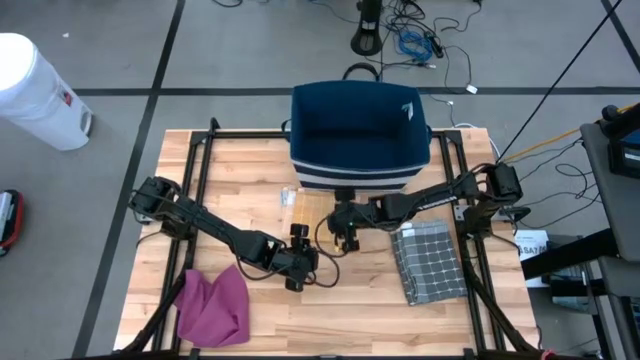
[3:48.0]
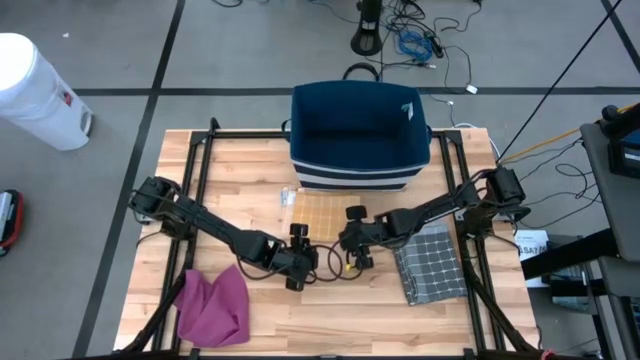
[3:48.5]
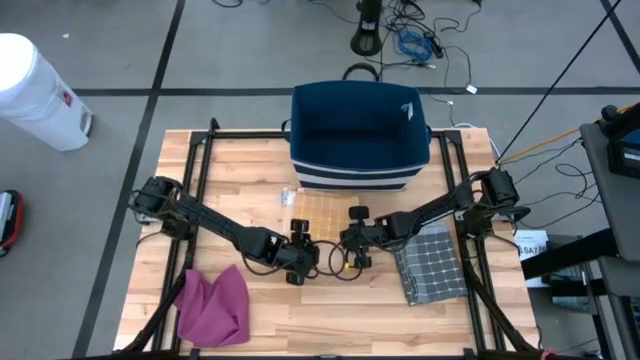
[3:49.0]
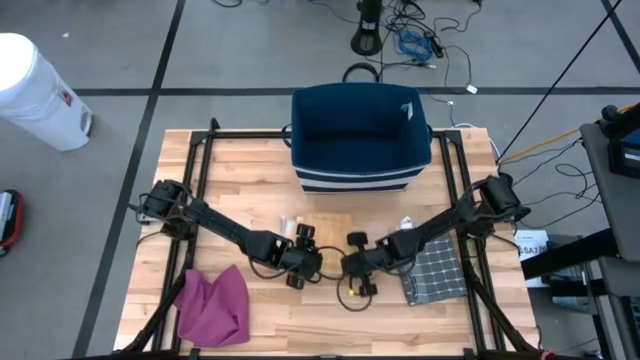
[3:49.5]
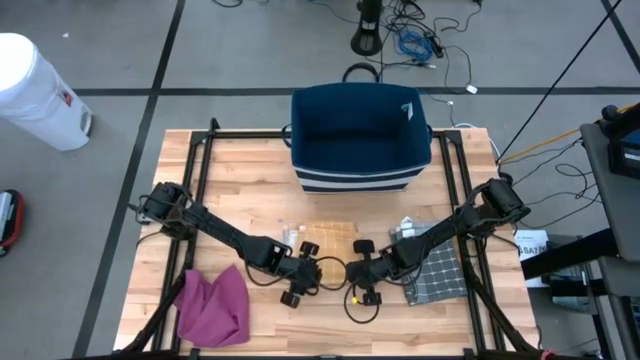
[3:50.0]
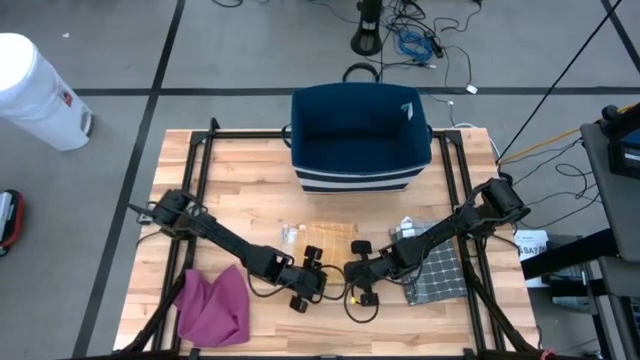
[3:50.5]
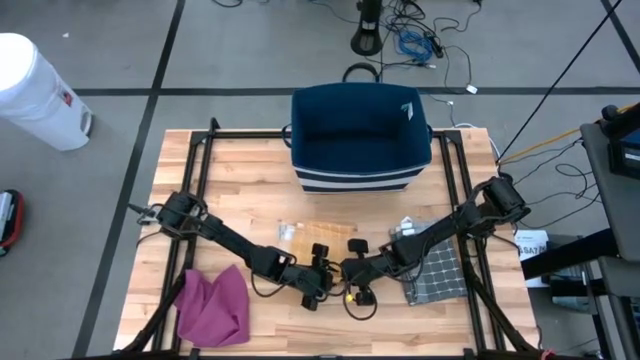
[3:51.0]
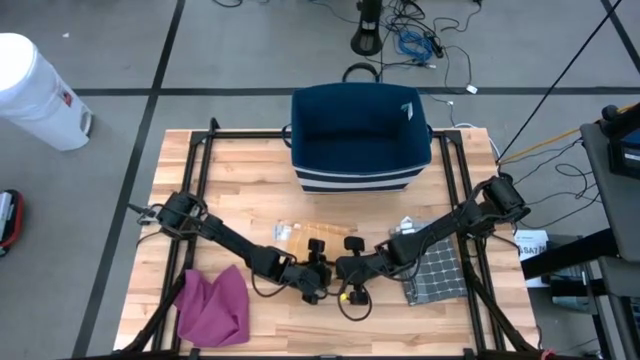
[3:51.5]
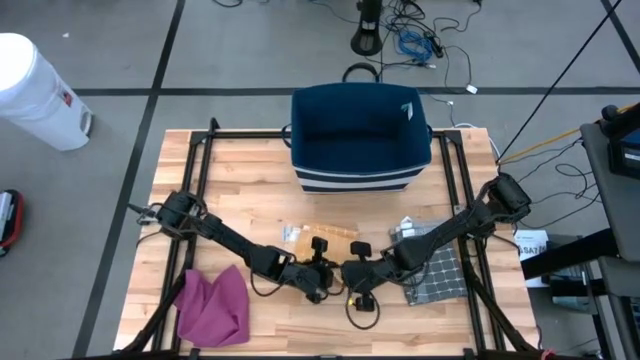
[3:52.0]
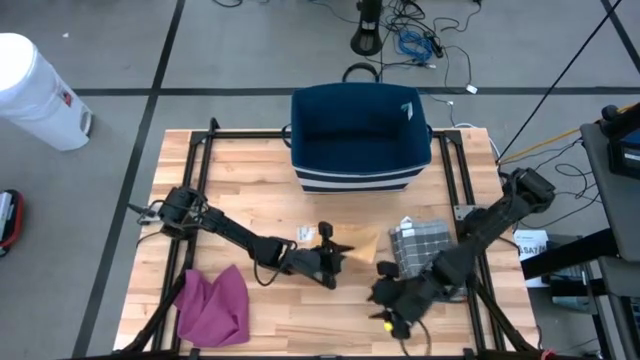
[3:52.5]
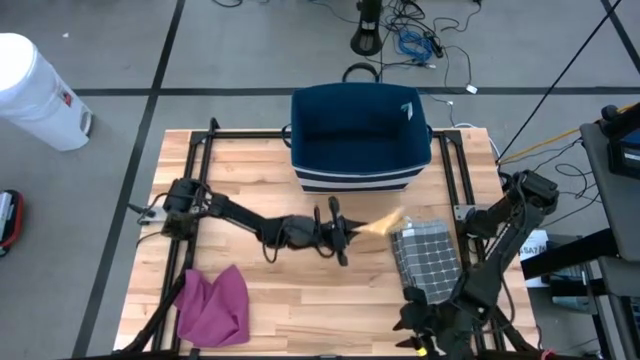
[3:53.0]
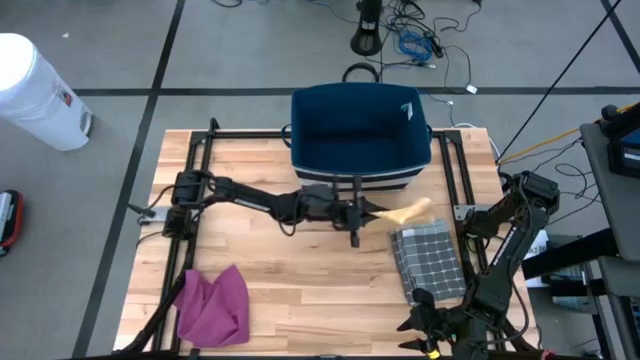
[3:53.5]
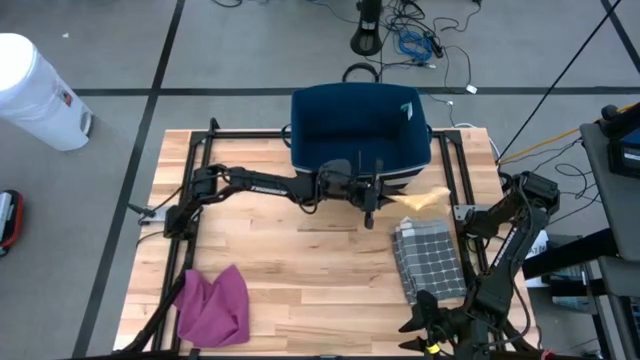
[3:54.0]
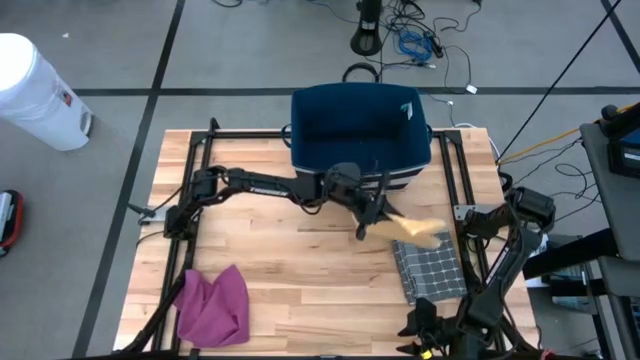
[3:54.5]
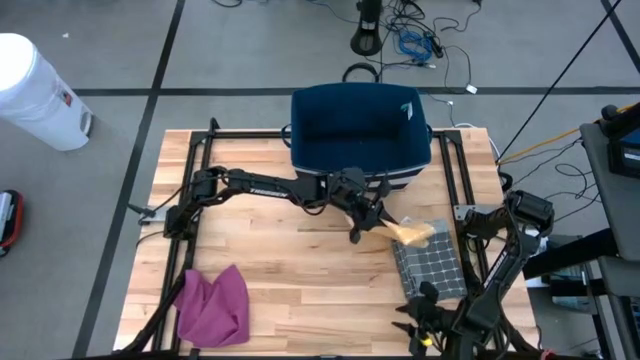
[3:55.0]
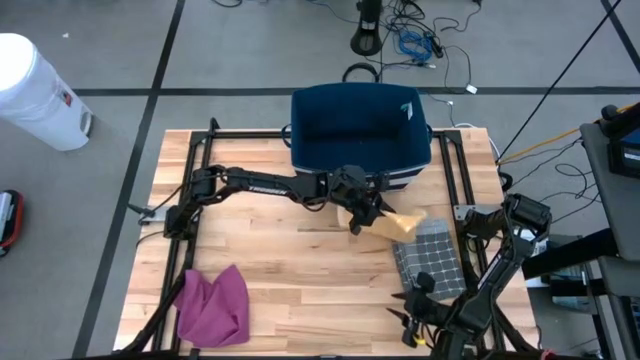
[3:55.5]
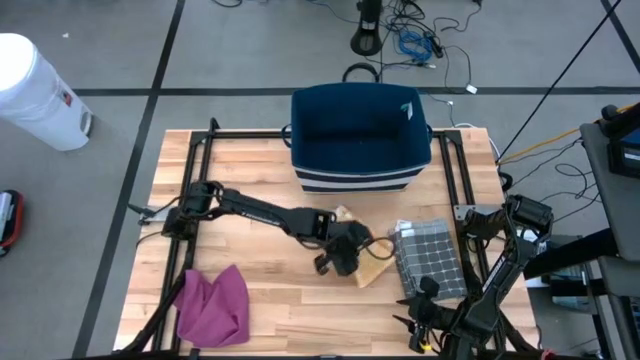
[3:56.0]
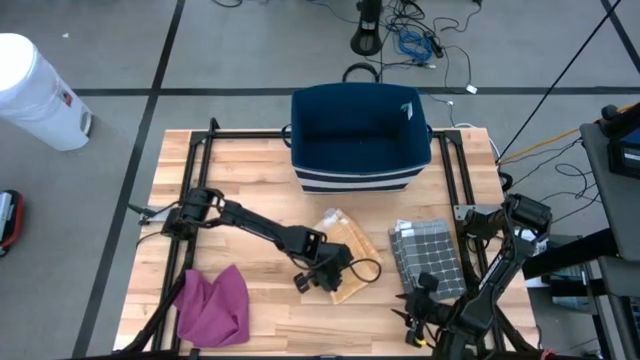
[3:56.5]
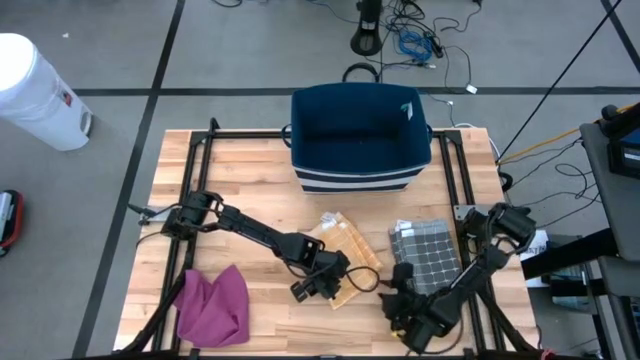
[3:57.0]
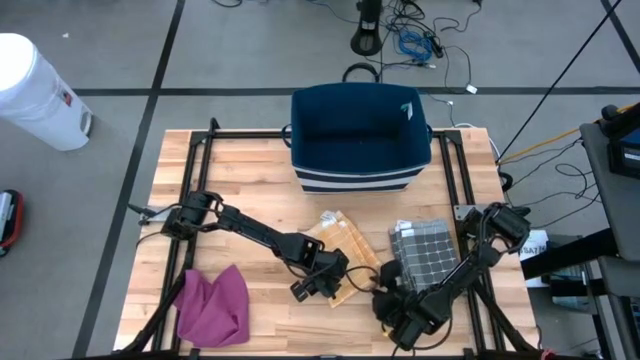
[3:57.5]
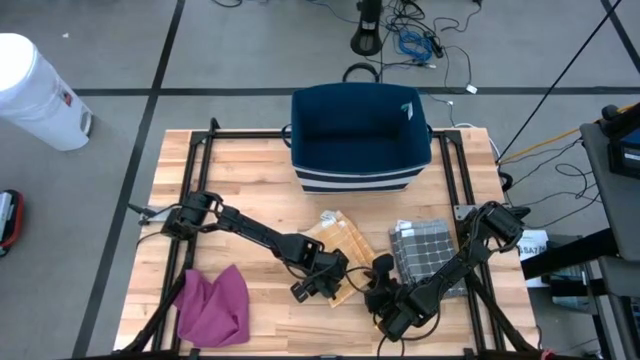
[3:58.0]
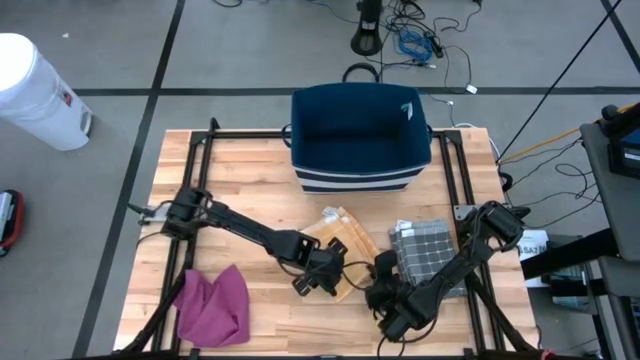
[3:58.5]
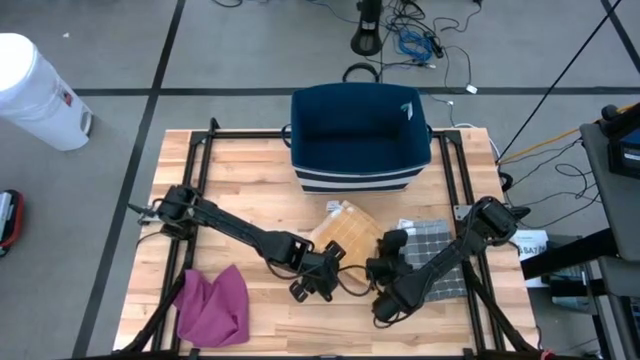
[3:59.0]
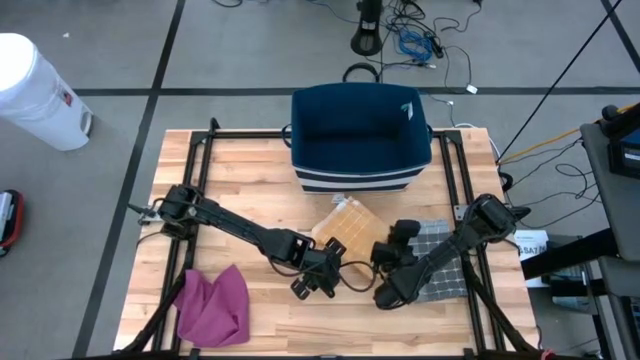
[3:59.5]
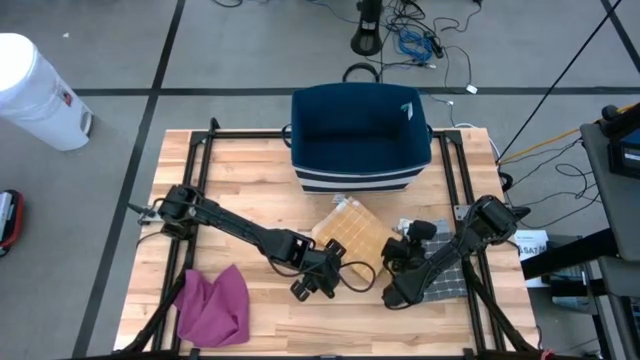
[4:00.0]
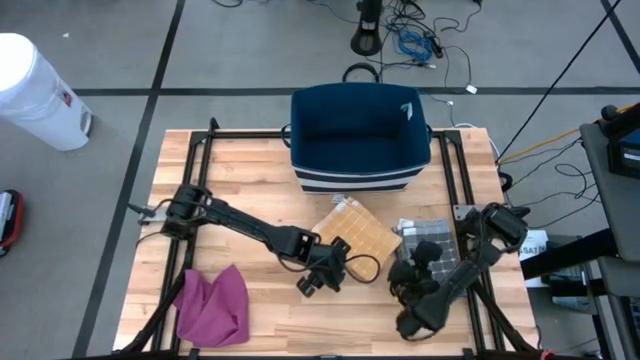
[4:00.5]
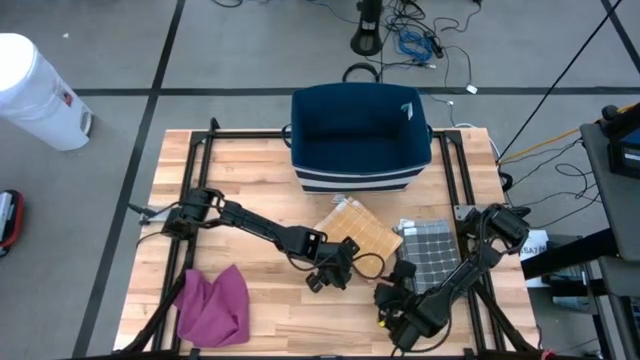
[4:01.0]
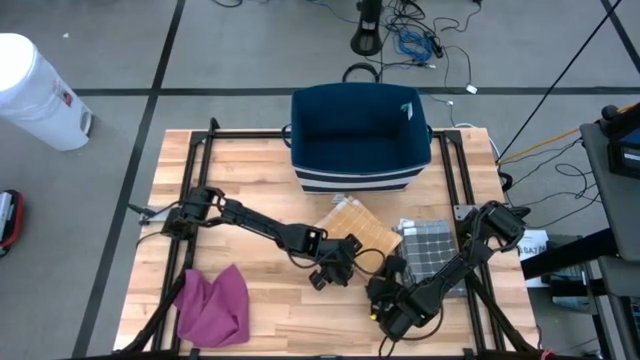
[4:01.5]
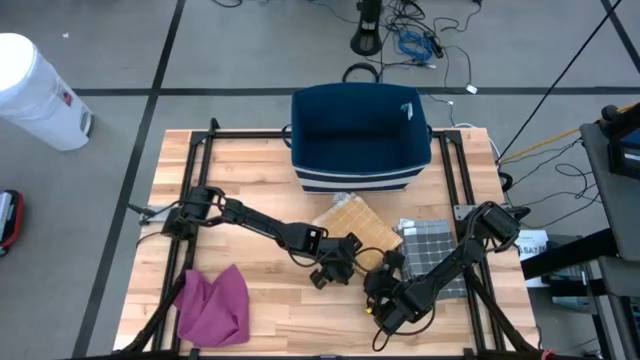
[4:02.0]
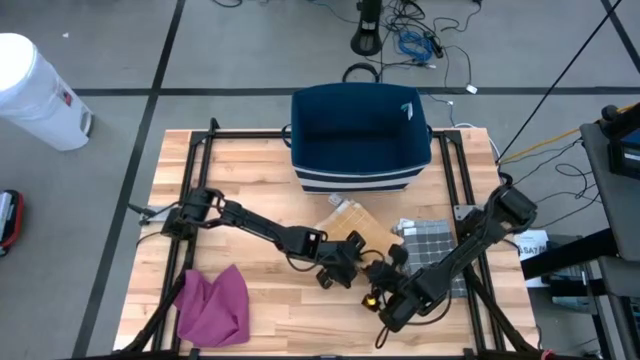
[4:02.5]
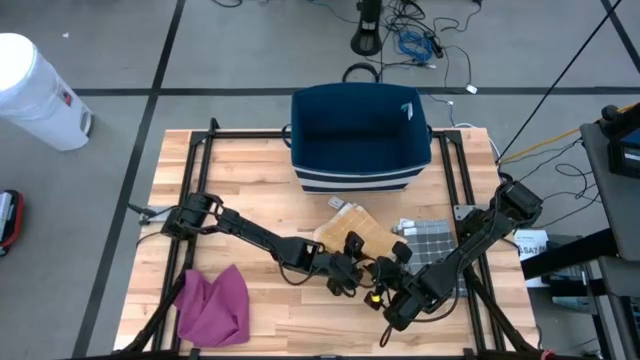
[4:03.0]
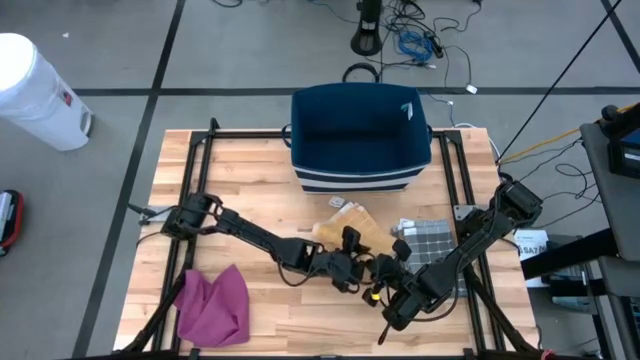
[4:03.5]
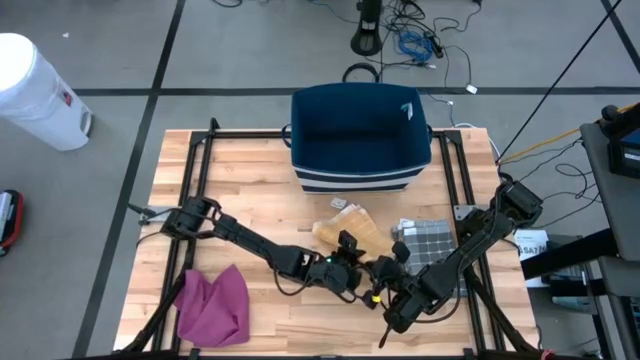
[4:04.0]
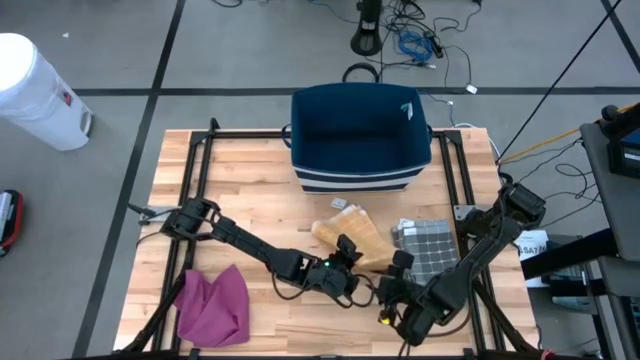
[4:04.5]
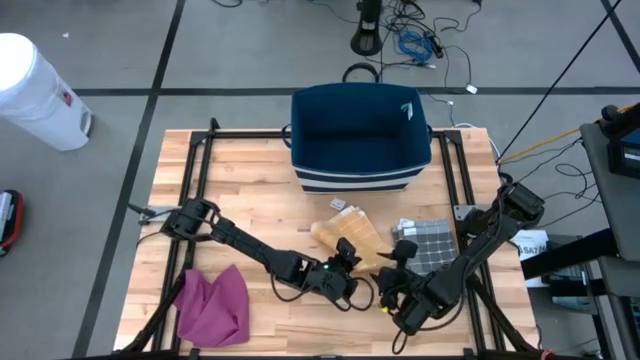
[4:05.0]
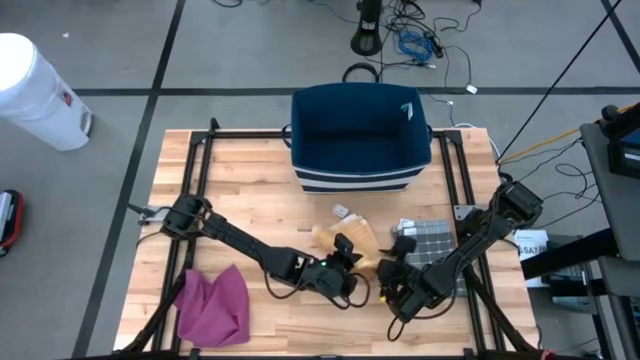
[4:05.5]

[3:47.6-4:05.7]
Task: Fold towel
Stack the orange patterned towel on the gray patterned towel

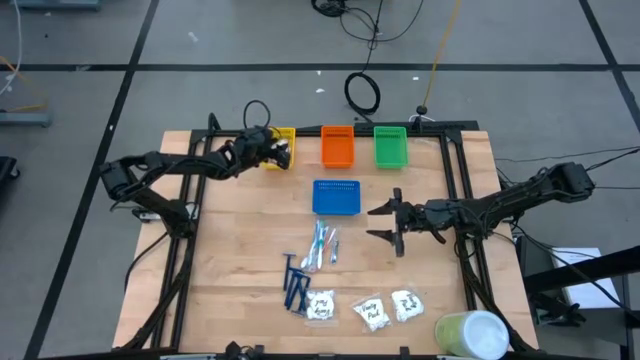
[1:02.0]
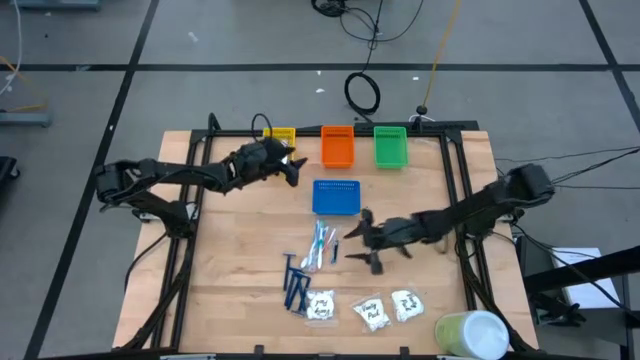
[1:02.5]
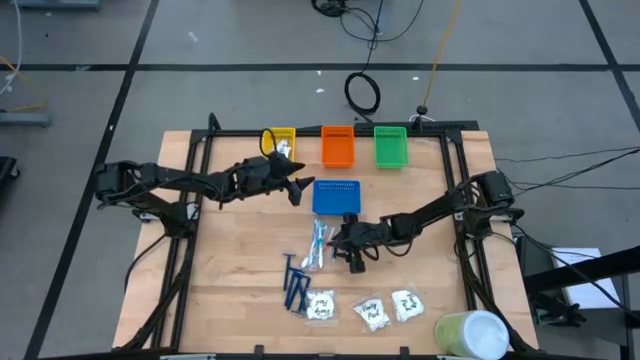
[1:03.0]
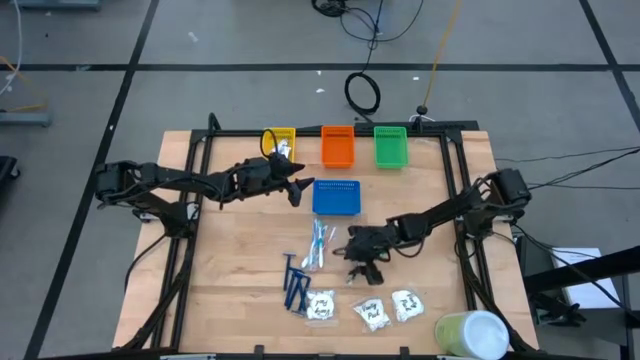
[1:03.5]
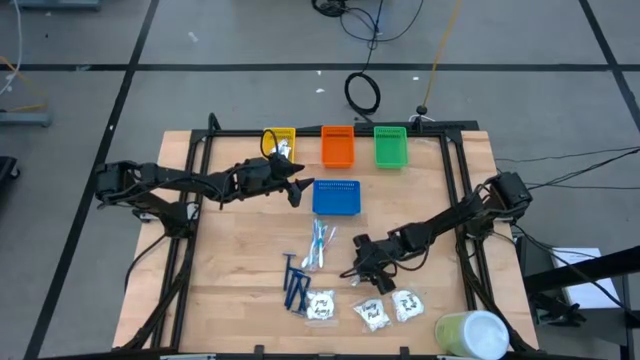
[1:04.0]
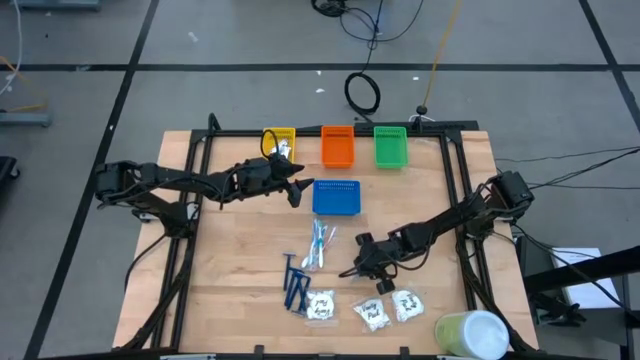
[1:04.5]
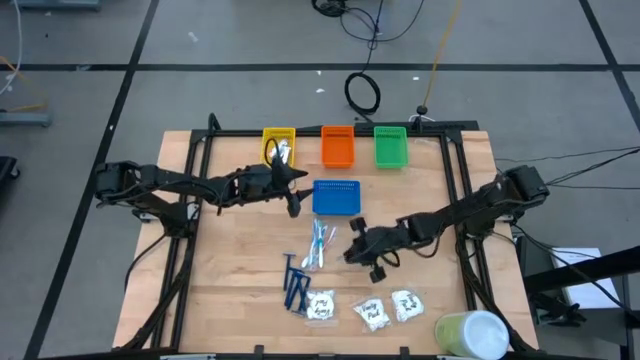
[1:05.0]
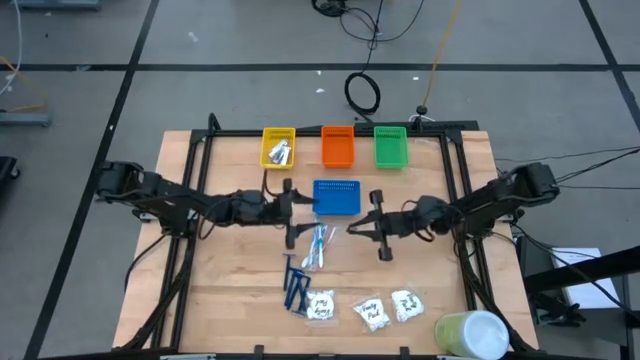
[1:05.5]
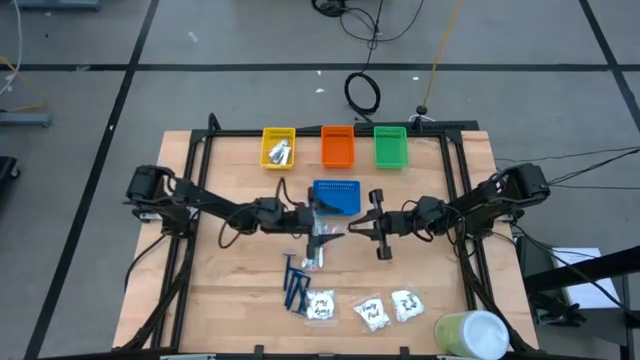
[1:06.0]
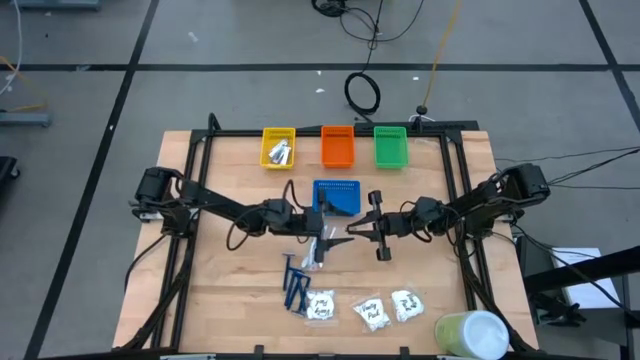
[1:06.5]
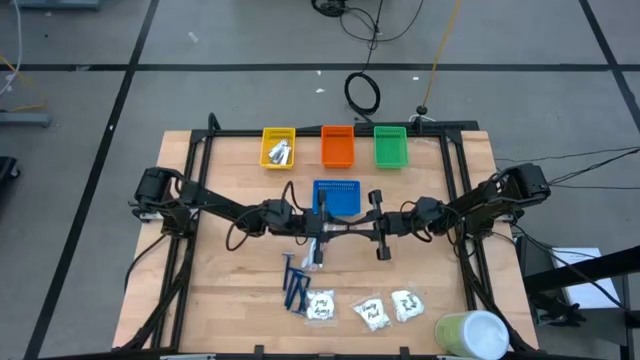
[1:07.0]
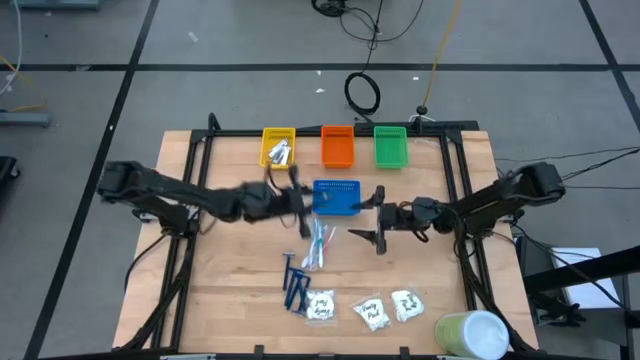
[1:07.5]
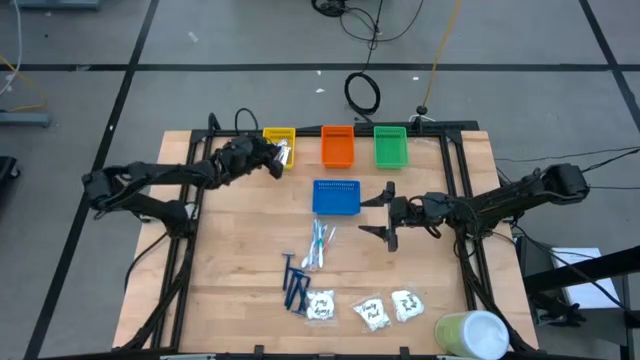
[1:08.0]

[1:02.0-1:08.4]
Task: Pick & Place Travel size toiletries
Put the silver nail cutter into the yellow basket
